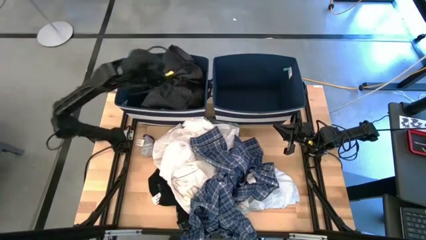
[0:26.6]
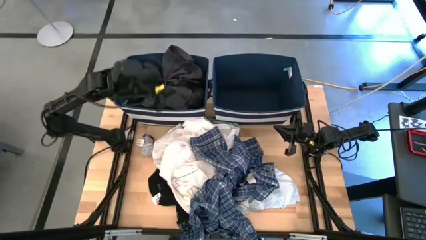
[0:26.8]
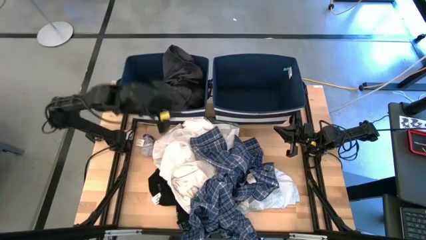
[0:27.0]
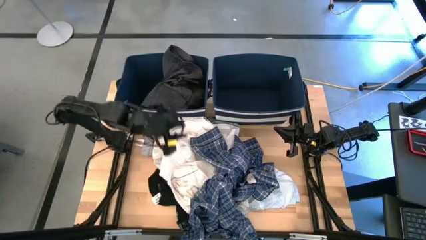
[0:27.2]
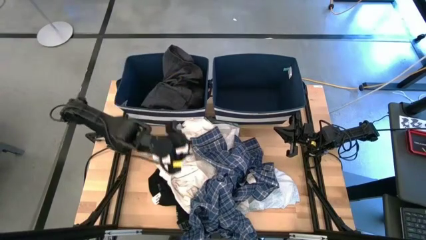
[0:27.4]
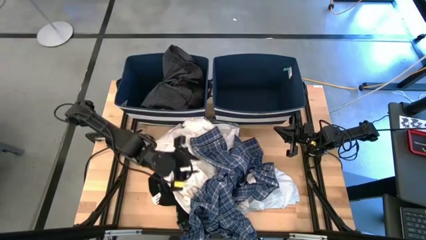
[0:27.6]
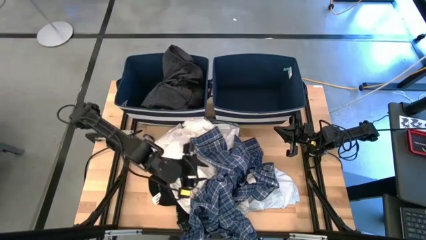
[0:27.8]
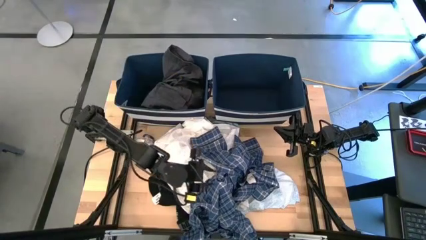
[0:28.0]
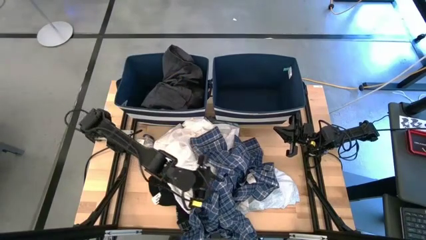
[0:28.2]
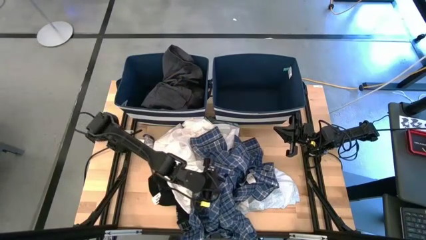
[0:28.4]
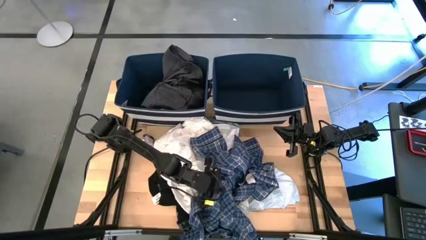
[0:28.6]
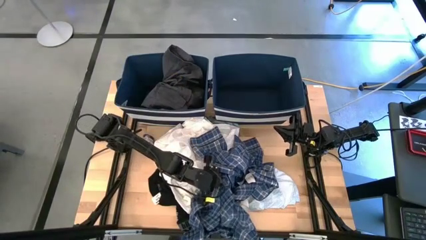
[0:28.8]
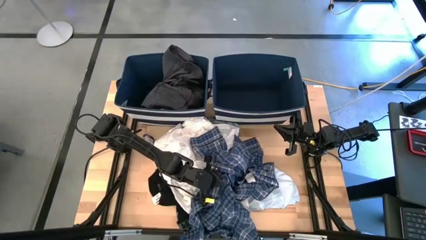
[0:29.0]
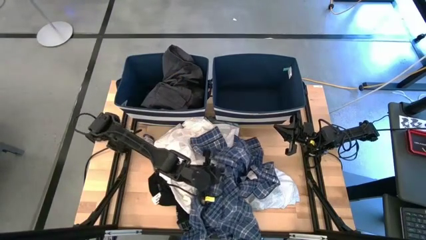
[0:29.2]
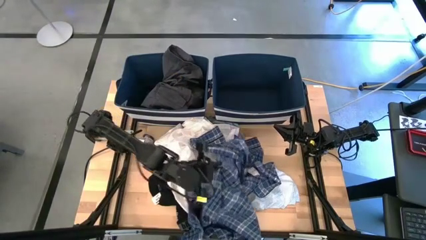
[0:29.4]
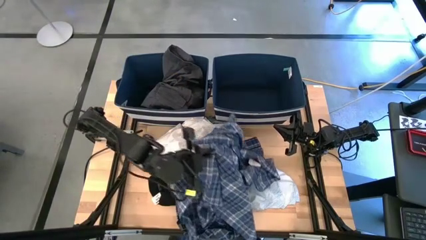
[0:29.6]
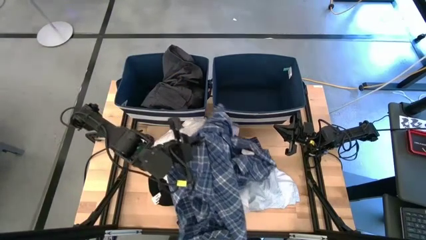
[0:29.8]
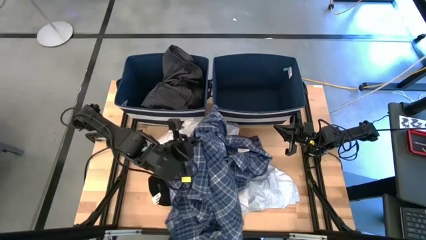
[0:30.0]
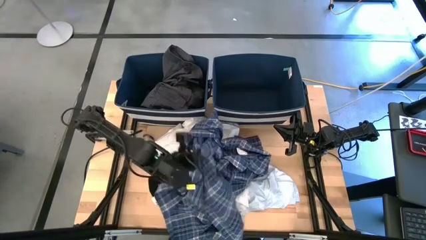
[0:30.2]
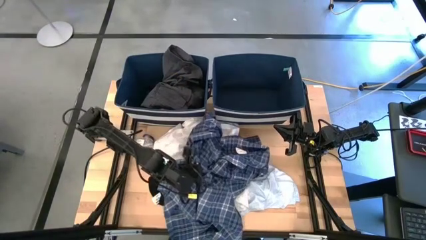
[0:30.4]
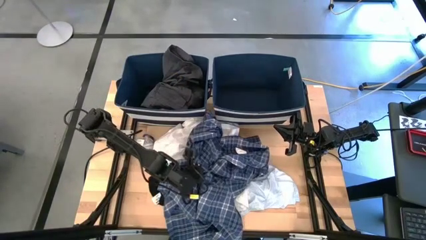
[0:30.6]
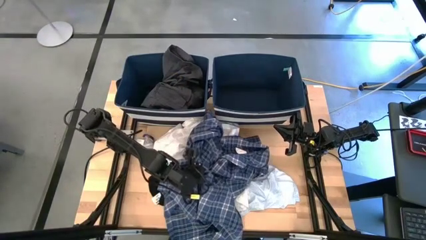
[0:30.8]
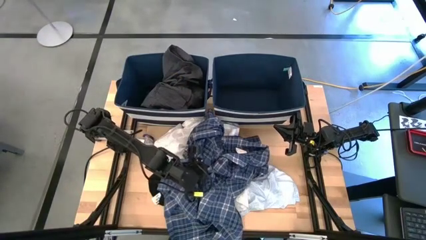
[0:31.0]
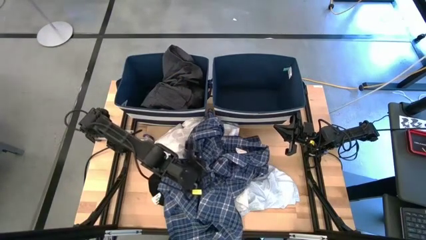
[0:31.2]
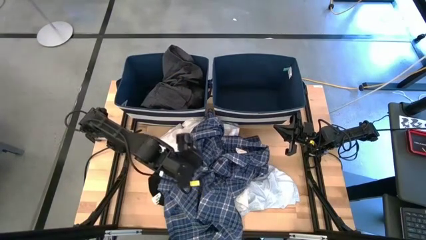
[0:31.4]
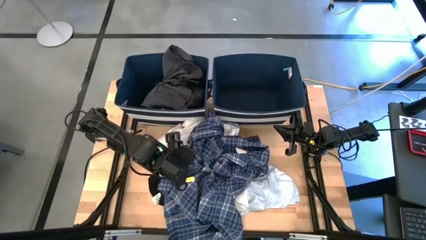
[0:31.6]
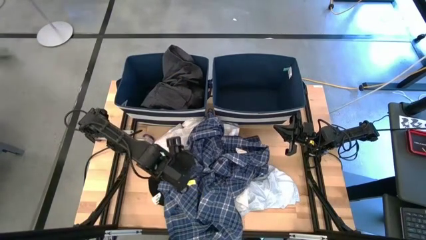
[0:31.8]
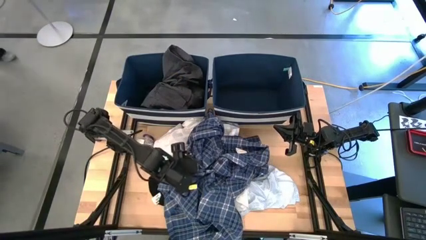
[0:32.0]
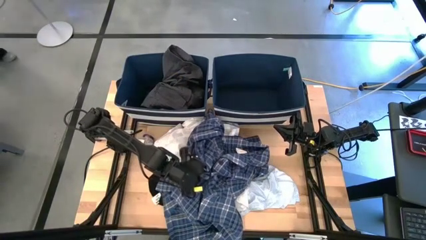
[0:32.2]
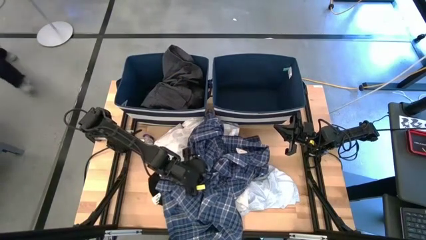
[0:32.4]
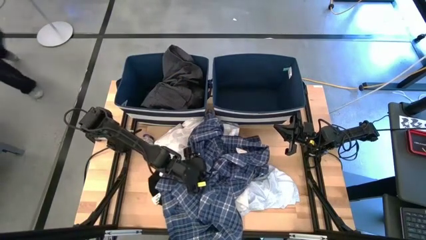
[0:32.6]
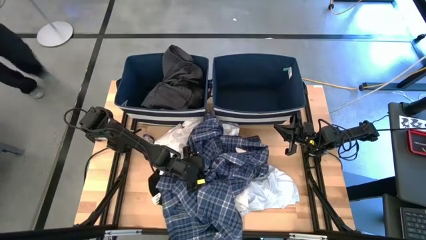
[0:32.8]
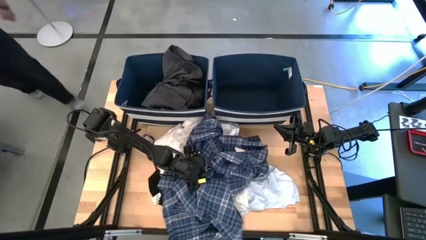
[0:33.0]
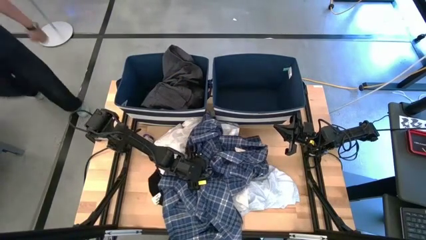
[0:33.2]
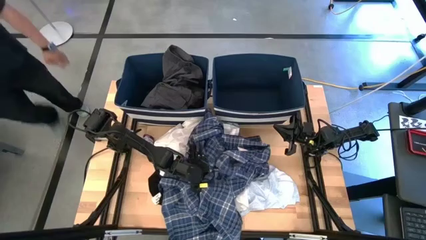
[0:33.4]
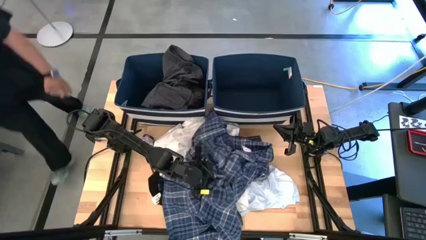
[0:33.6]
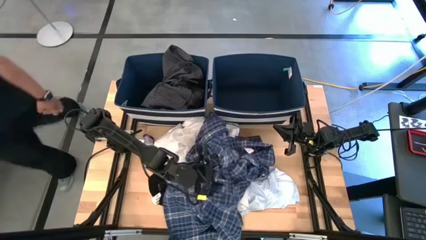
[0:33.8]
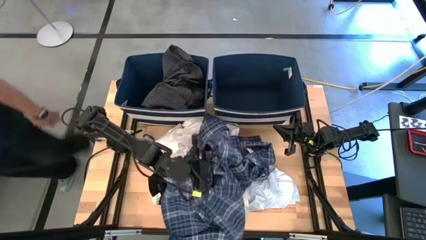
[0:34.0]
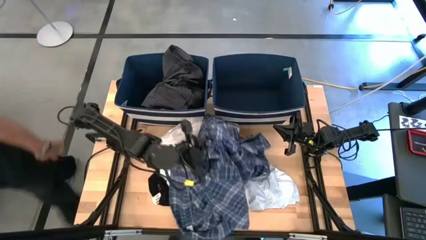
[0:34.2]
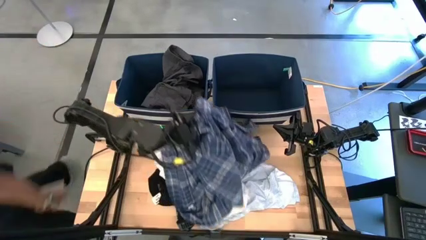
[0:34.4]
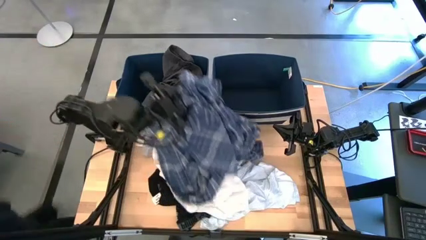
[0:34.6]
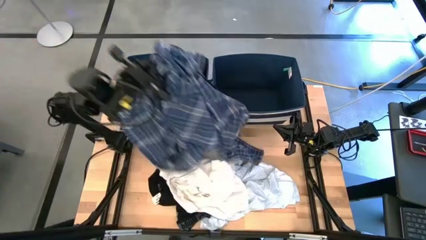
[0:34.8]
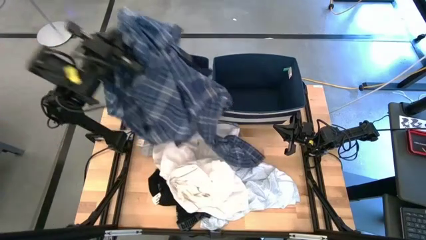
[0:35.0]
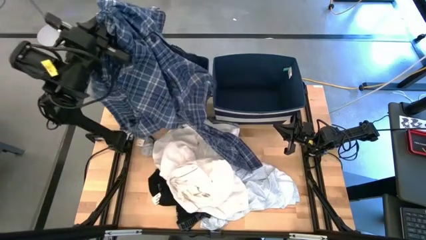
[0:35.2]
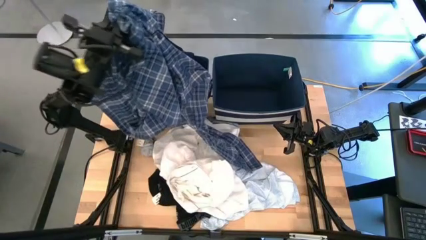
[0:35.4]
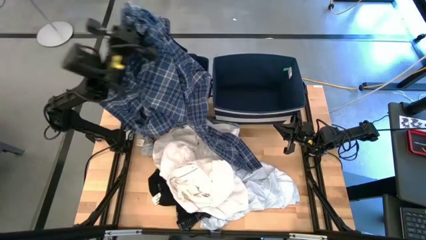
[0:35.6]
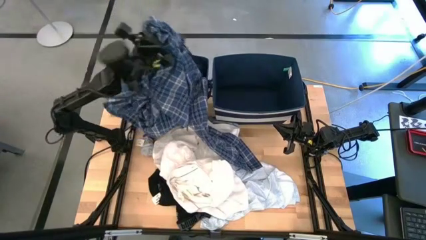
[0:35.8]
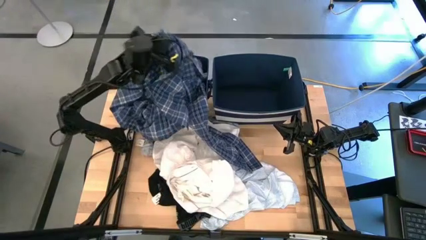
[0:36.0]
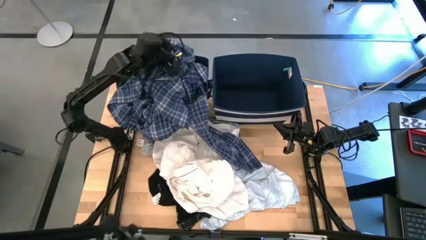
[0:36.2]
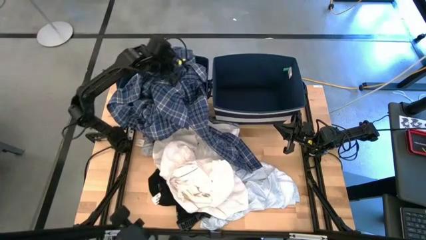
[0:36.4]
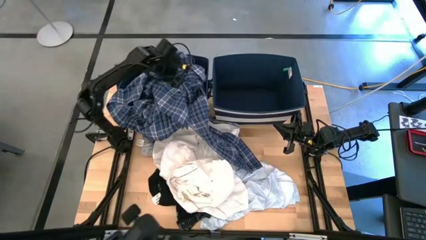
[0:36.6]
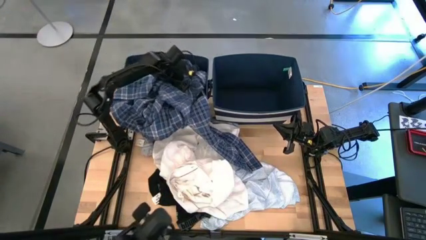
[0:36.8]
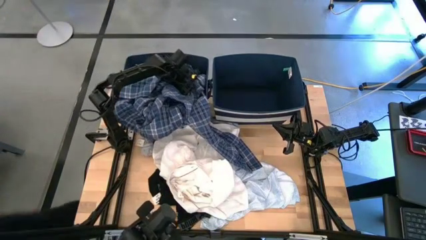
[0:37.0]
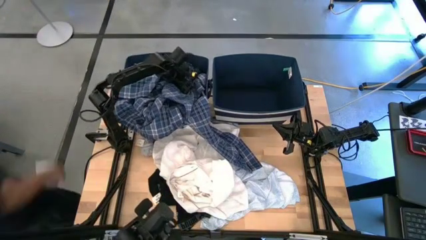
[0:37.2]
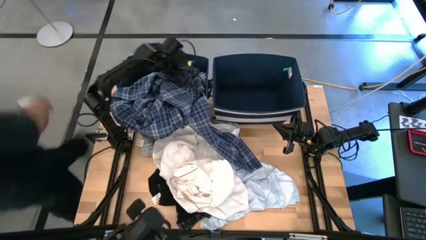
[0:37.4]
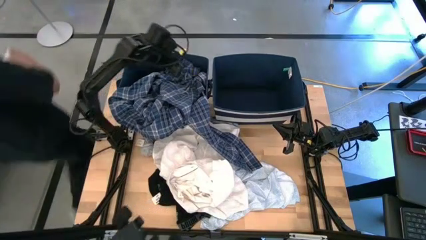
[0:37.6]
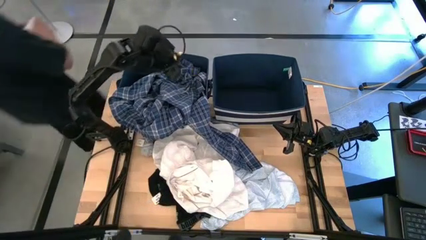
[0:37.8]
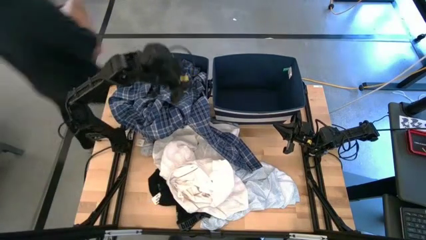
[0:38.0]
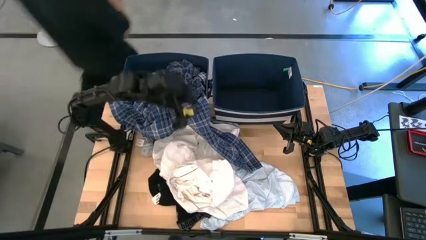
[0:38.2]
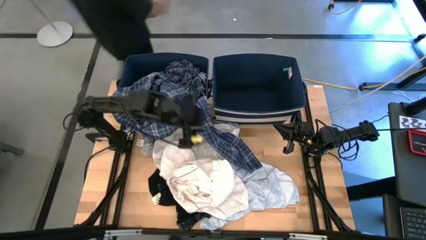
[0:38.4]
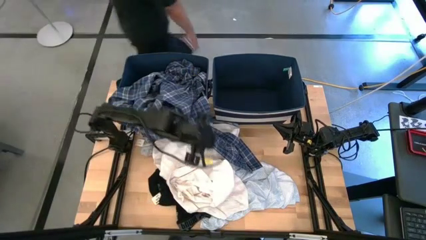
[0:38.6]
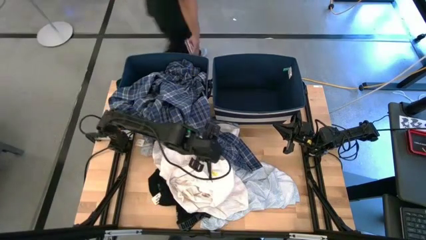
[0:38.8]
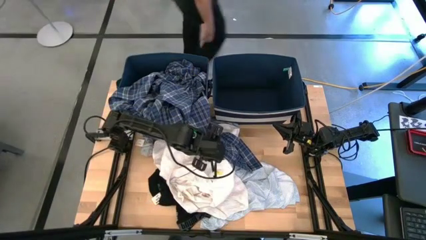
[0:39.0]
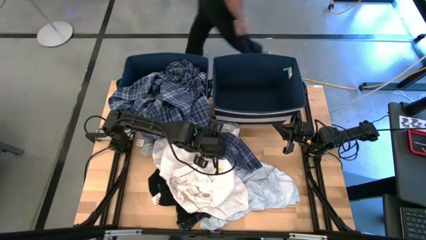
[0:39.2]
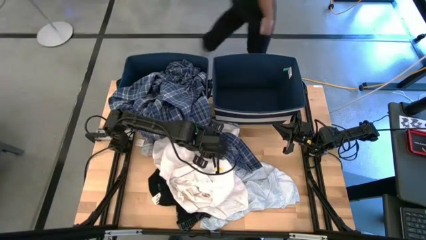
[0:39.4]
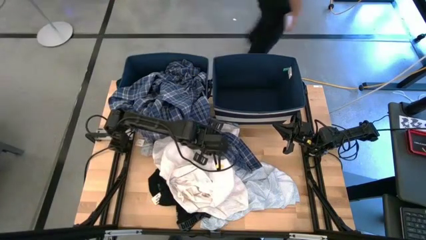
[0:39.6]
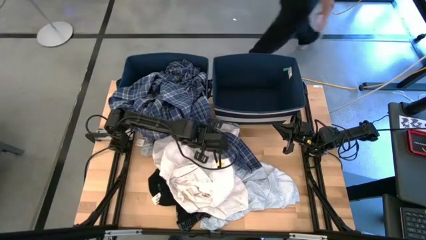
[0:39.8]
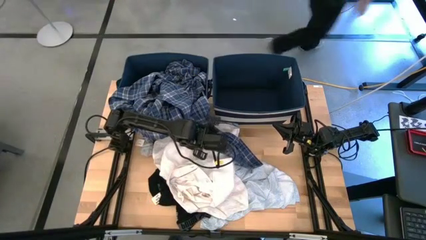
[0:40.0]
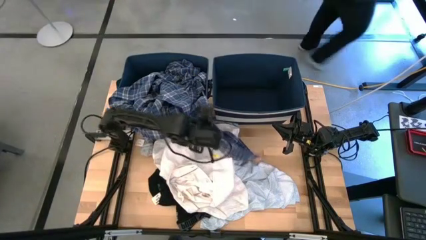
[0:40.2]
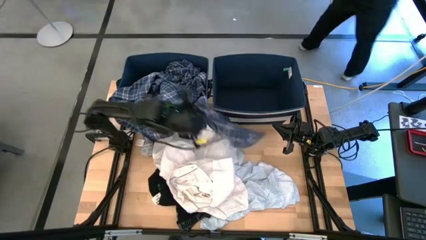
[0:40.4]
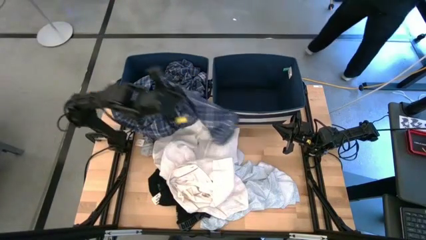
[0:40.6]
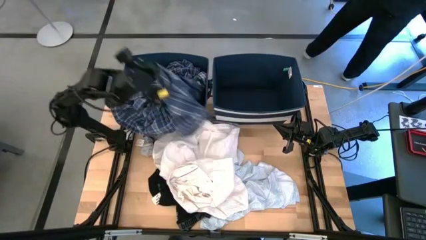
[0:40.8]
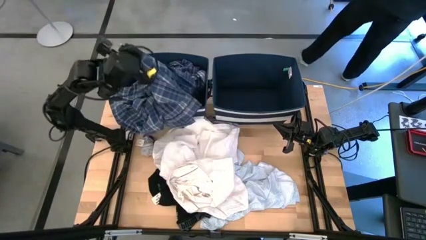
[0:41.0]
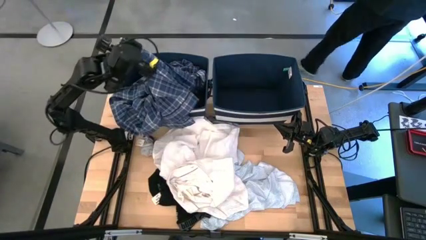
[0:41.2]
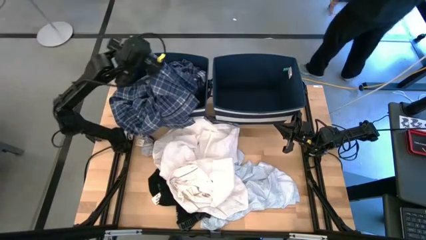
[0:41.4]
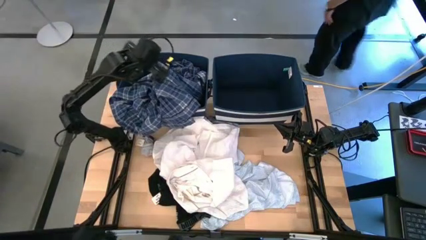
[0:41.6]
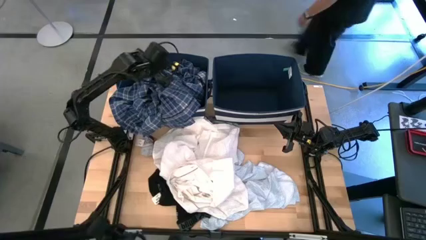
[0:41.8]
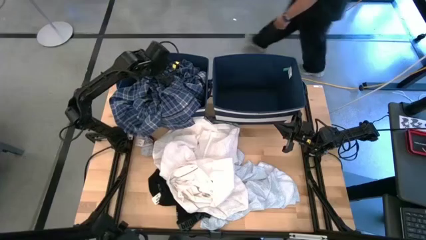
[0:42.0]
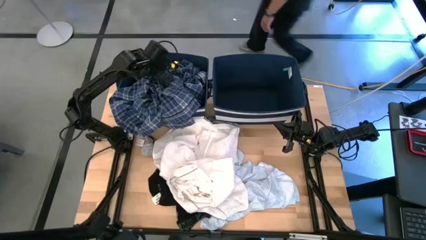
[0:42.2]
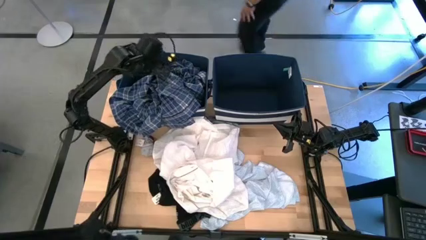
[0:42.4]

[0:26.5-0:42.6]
Task: Sort clothes
Put the long sleeve plaid shirt into the left blue laundry bin
